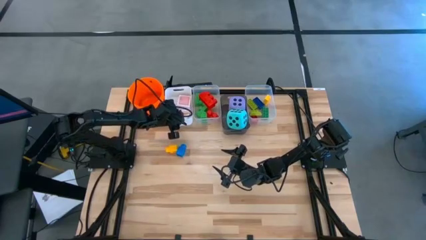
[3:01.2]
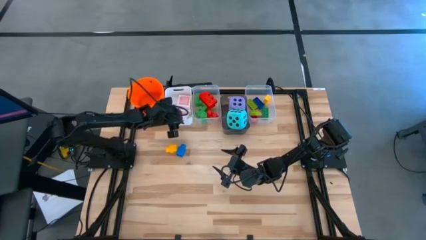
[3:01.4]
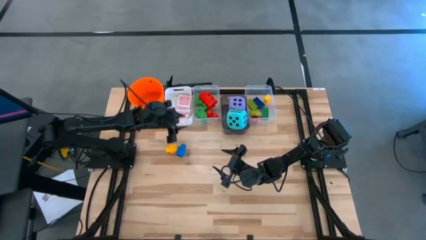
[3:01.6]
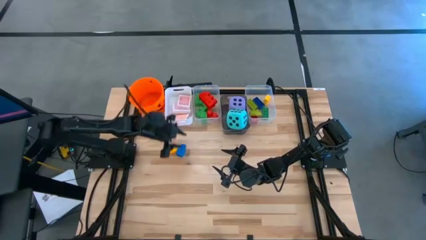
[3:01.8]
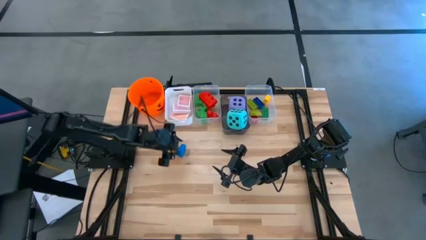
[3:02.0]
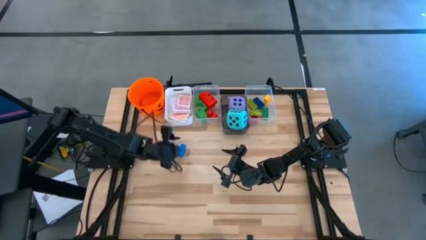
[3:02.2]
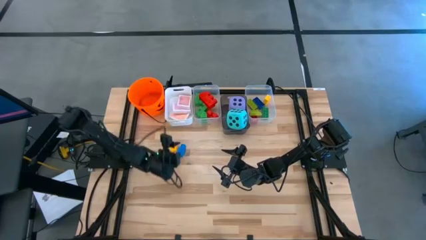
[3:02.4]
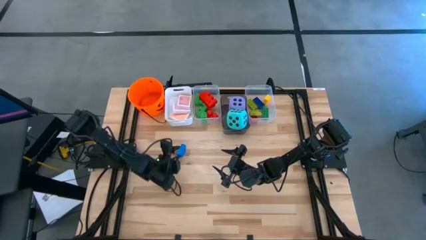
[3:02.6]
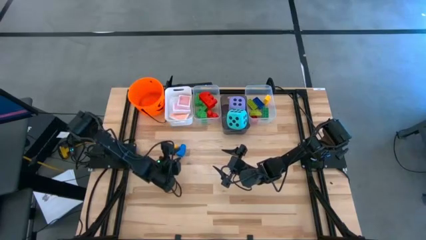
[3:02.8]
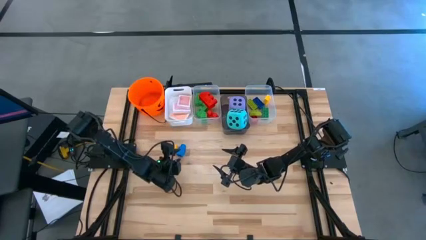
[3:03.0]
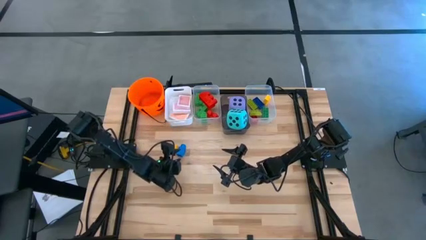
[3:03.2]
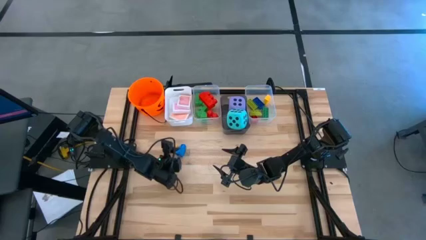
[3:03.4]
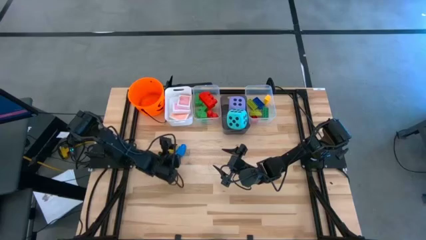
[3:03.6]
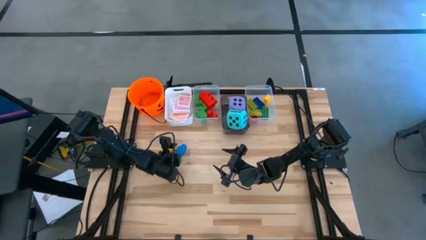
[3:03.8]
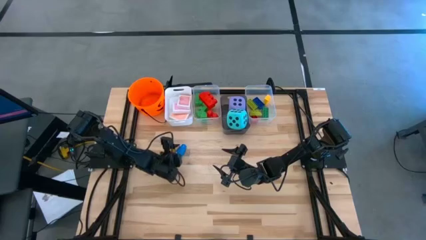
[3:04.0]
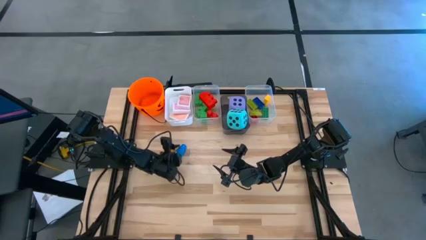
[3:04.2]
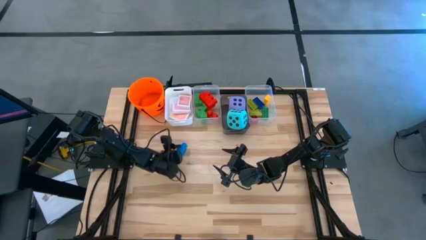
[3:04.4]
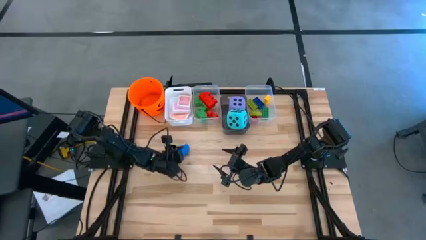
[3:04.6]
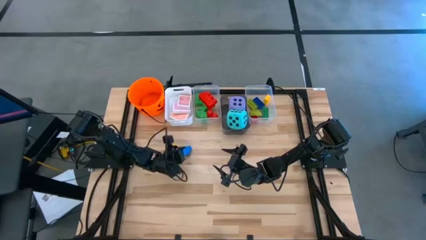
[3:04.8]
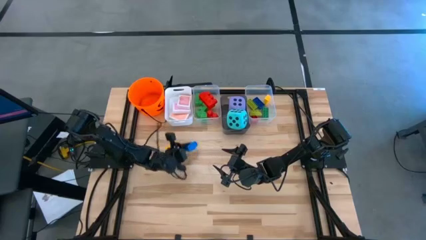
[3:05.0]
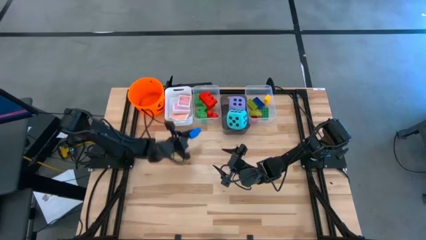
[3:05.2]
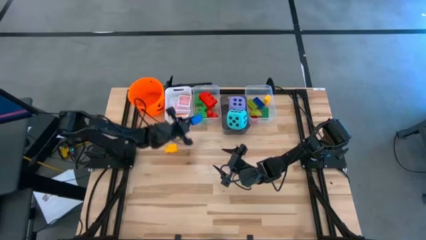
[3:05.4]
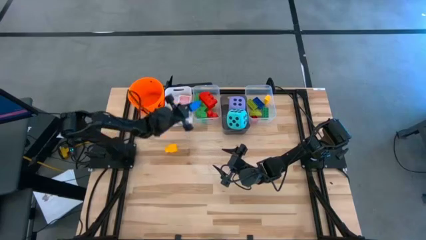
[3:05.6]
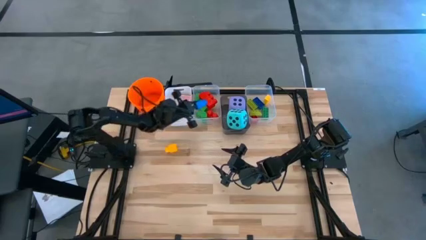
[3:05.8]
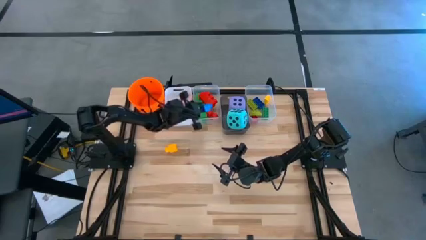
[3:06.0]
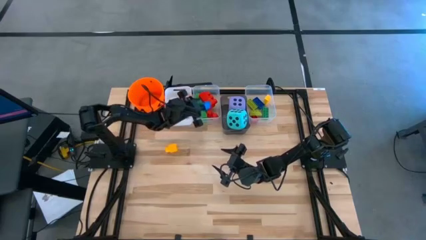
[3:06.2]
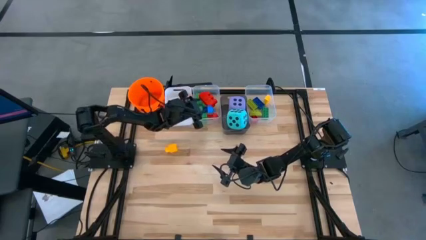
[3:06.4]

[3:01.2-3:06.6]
Task: Pick & Place Toys
Put the large blue game piece into the left transparent bin

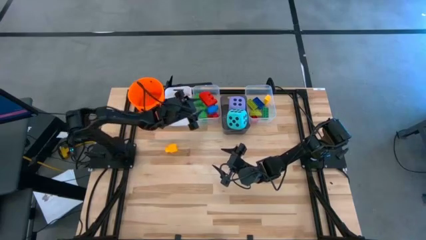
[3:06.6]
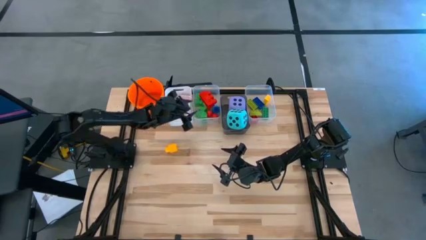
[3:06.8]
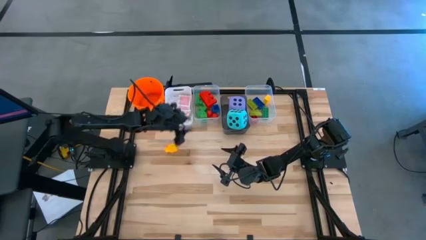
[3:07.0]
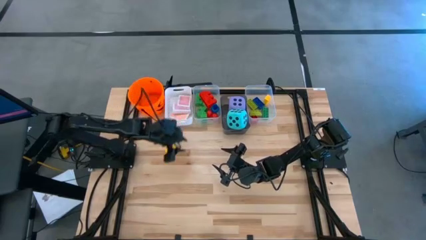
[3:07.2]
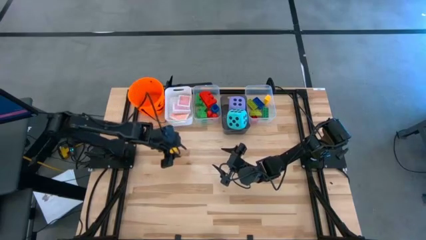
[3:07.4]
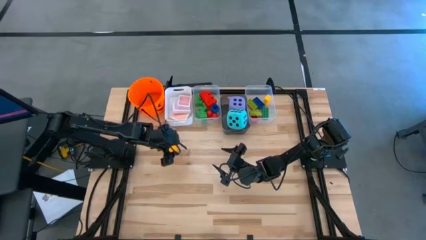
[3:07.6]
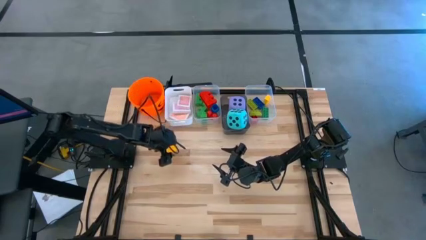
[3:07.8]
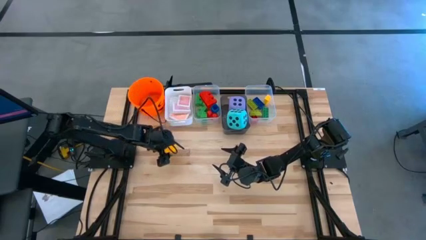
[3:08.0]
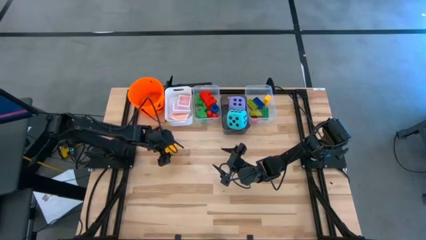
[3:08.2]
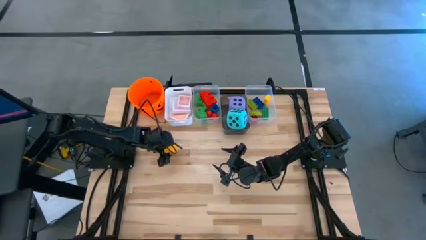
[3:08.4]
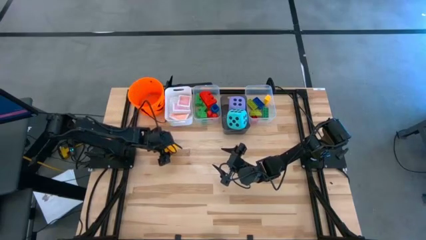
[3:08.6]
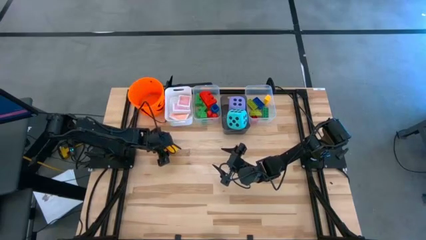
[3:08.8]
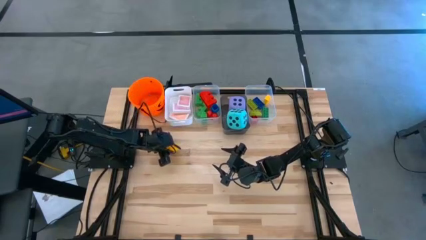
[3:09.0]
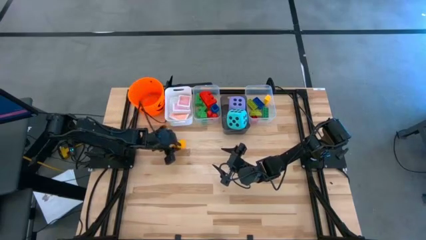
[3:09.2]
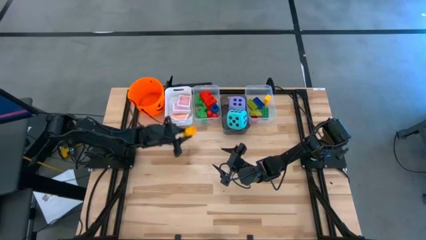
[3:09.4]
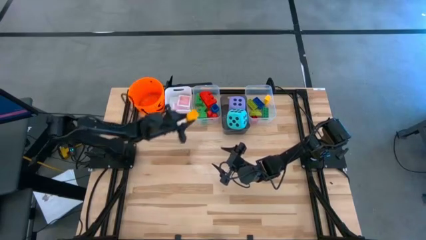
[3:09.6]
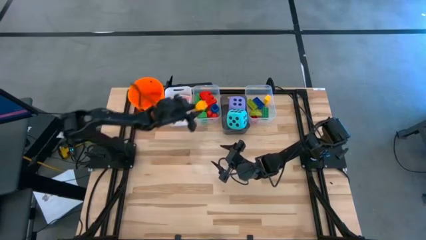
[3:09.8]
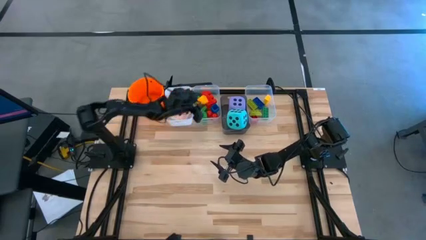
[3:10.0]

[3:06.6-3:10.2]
Put the large yellow game piece into the left transparent bin

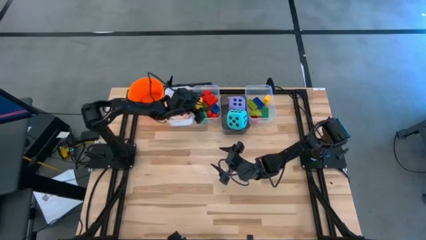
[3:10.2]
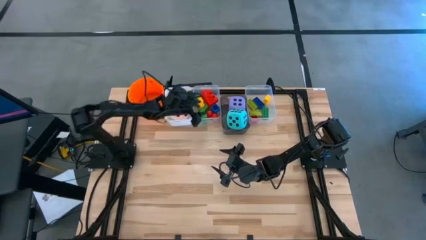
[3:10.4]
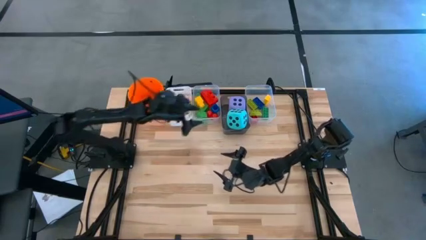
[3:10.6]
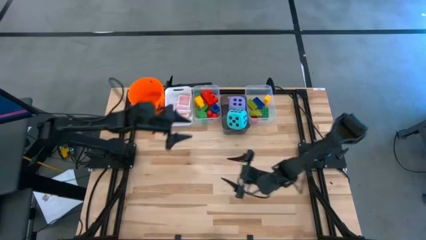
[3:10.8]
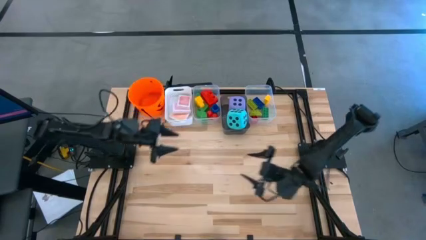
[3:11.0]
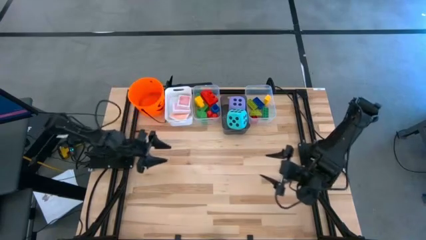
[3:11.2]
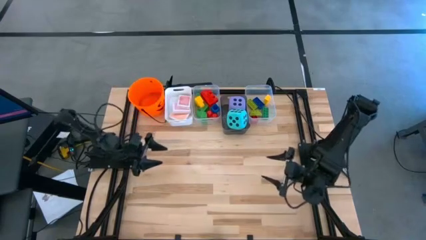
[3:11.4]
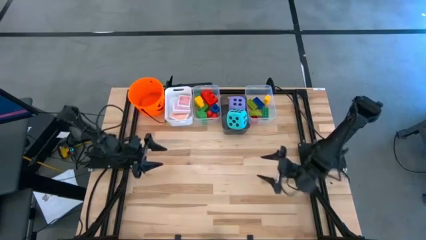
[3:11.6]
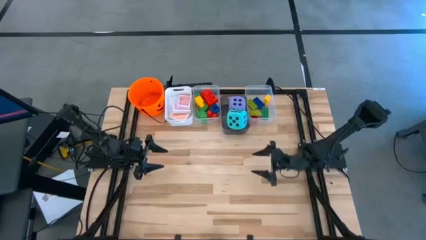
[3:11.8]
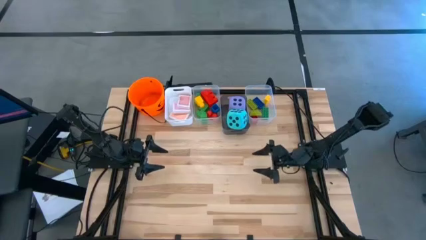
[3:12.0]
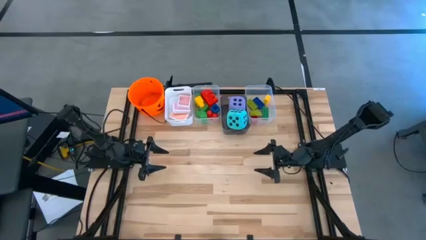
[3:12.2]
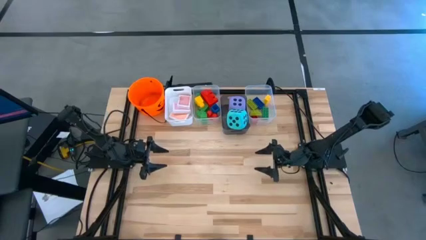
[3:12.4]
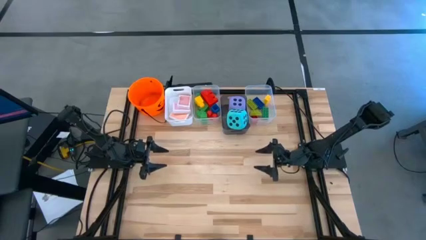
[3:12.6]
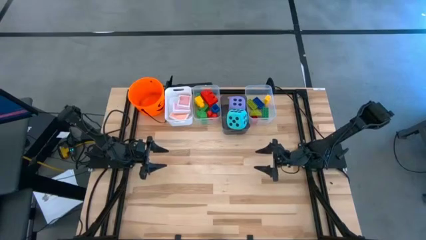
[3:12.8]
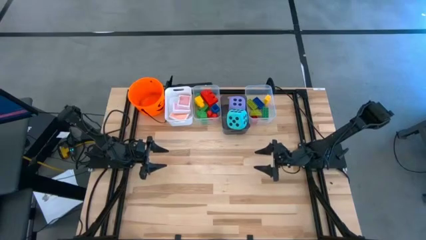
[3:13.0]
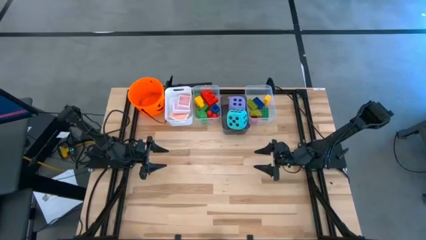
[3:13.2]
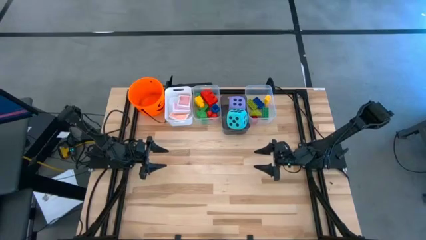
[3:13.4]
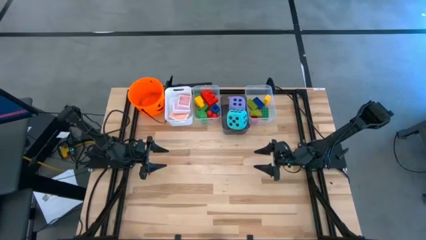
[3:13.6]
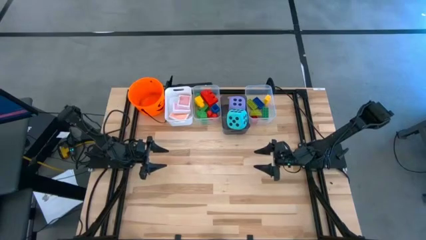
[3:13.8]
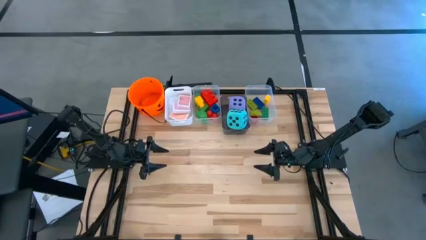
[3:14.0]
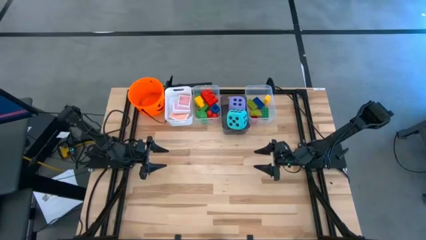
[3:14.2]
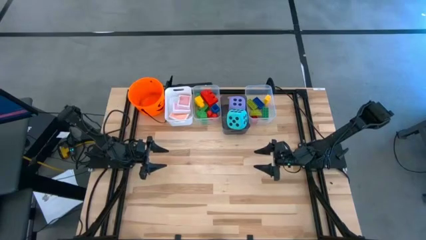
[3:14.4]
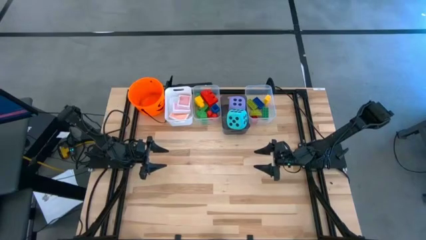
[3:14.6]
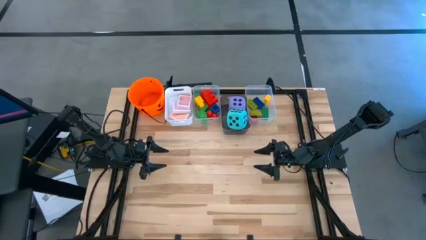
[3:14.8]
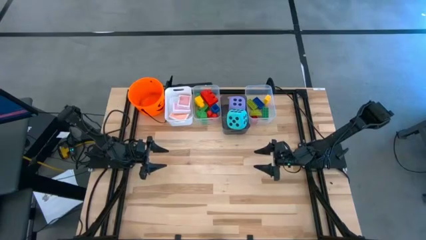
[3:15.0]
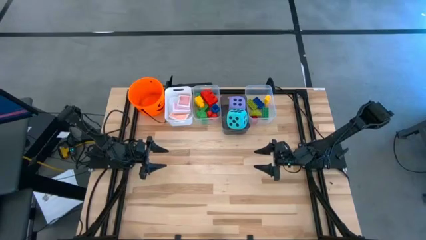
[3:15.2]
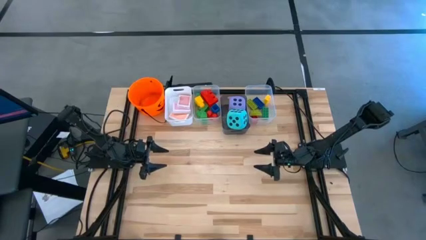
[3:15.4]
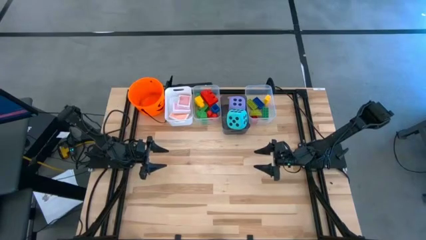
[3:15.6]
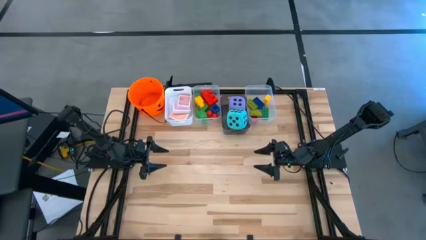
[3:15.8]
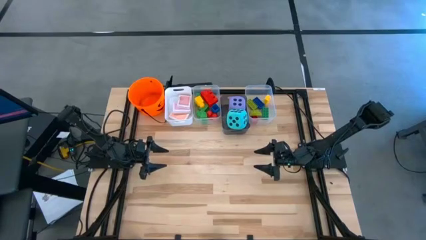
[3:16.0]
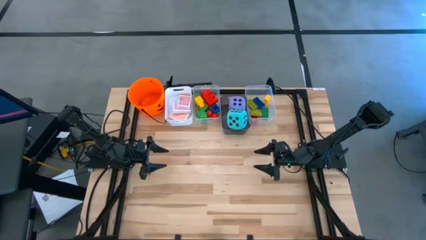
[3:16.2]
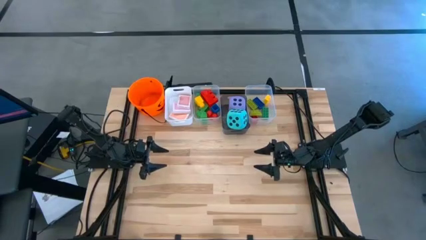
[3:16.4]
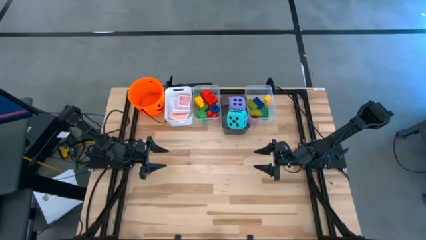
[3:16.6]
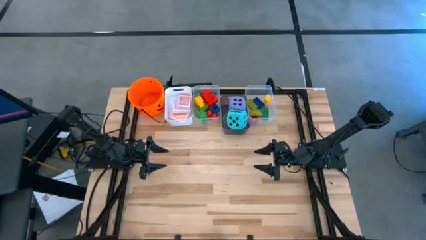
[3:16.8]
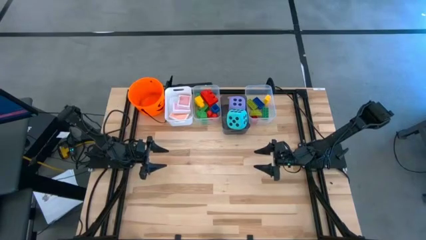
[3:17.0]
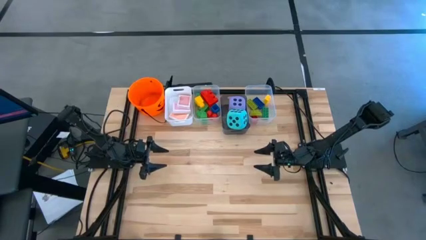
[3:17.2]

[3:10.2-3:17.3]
Return to Home Position
